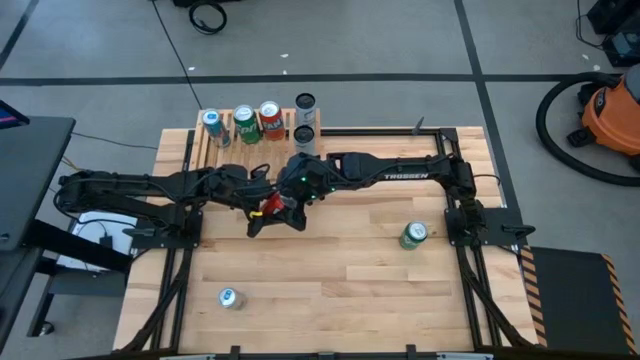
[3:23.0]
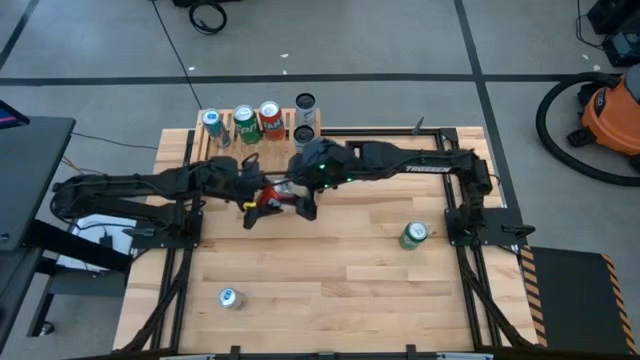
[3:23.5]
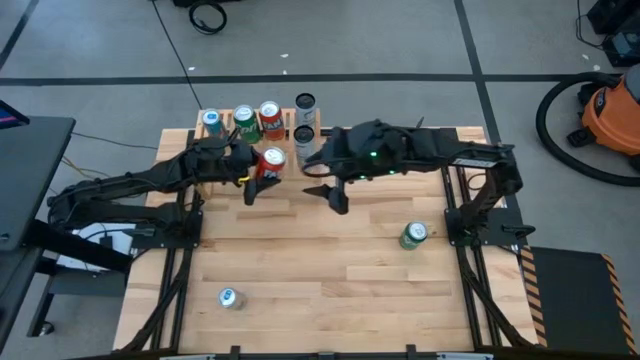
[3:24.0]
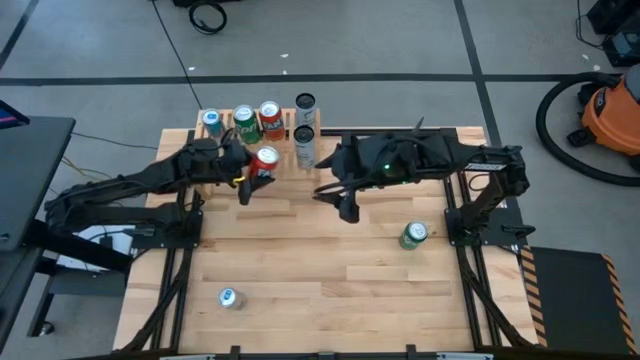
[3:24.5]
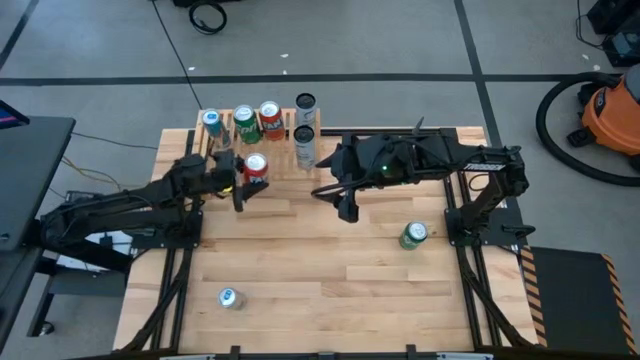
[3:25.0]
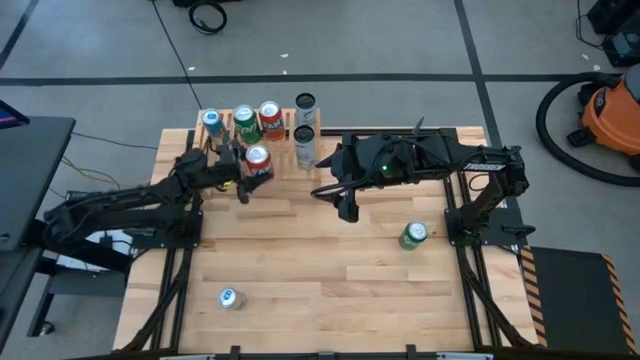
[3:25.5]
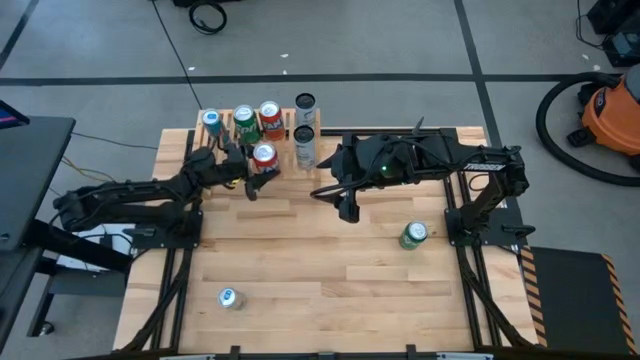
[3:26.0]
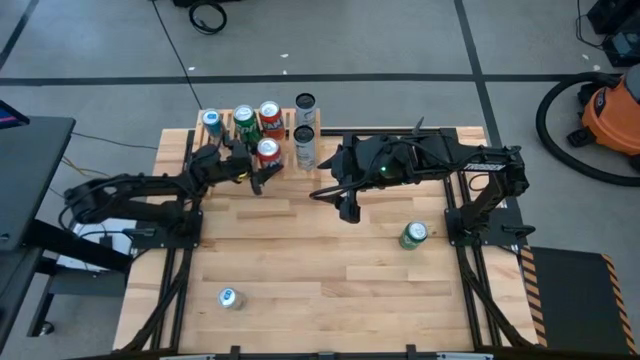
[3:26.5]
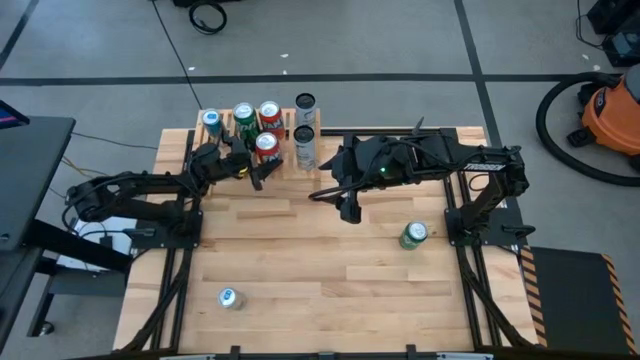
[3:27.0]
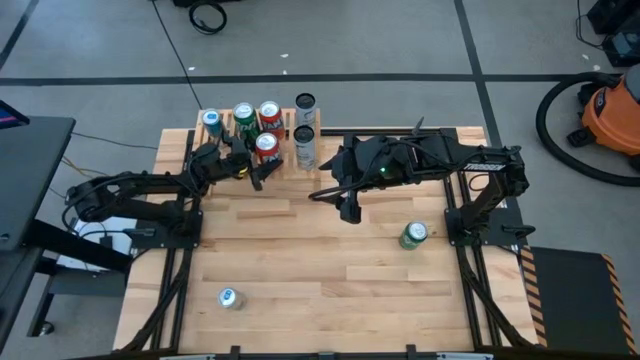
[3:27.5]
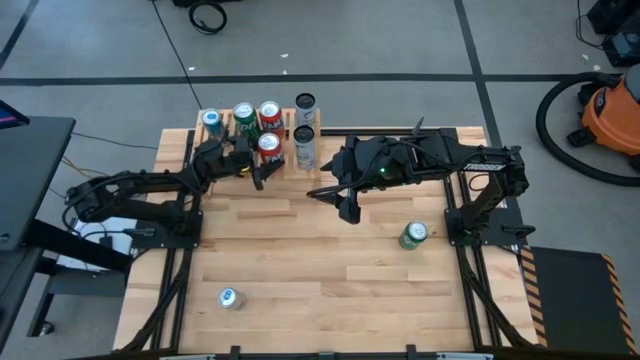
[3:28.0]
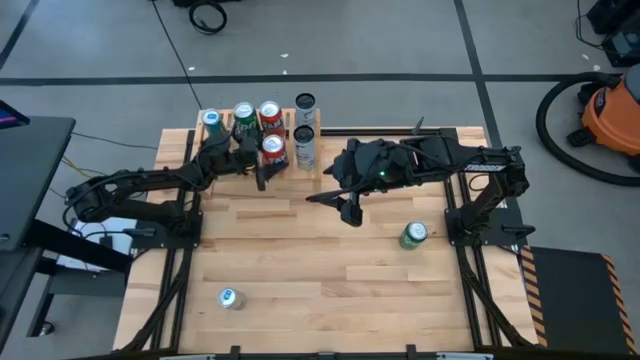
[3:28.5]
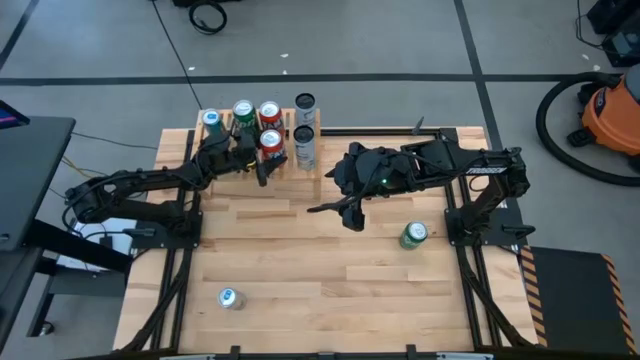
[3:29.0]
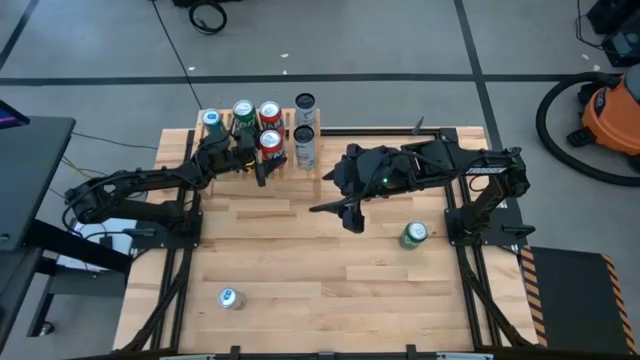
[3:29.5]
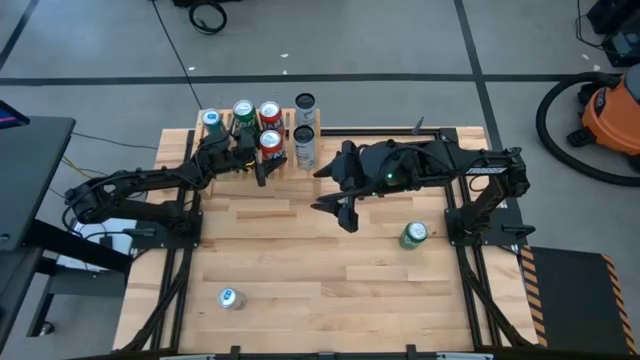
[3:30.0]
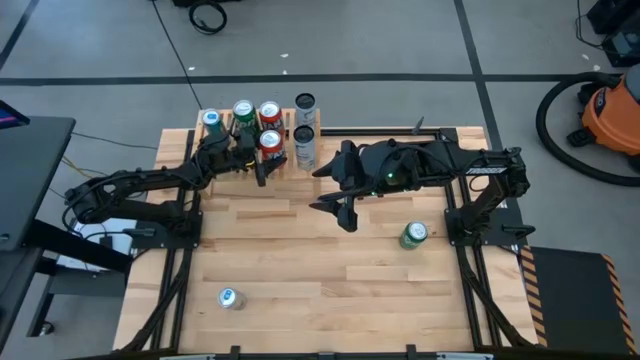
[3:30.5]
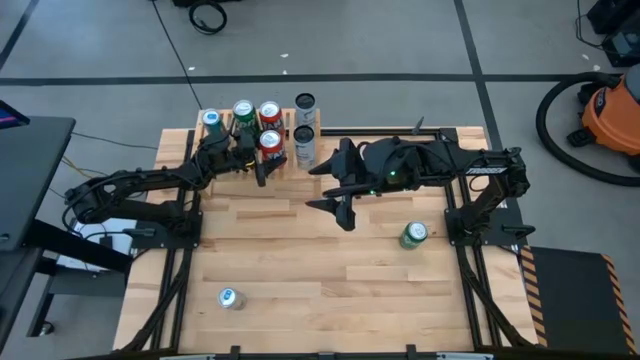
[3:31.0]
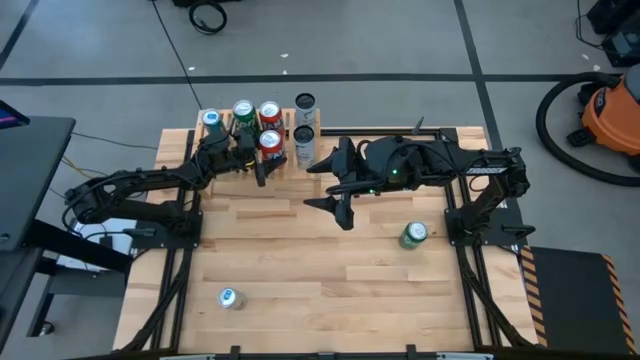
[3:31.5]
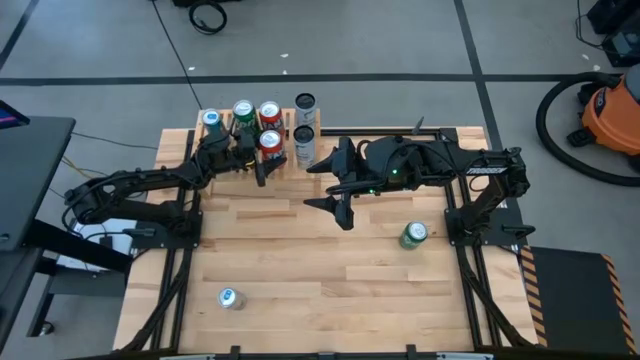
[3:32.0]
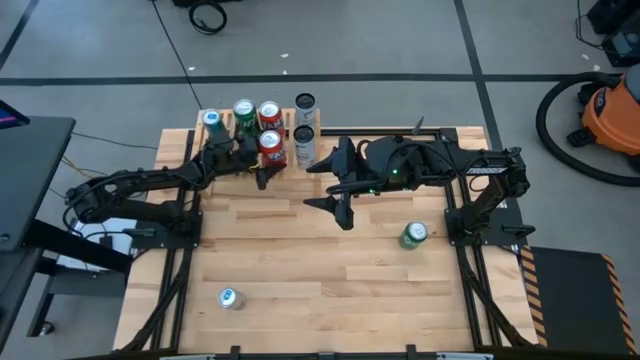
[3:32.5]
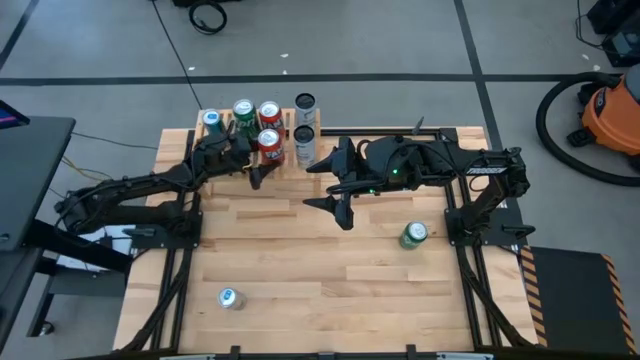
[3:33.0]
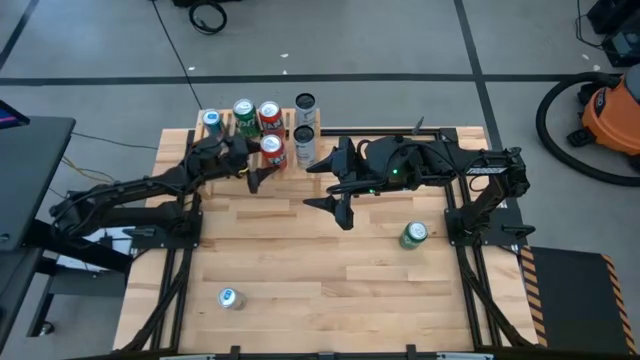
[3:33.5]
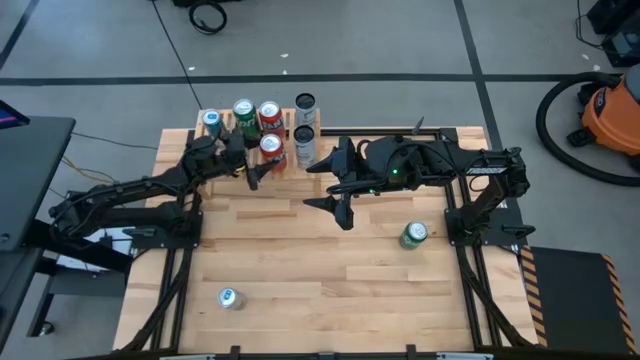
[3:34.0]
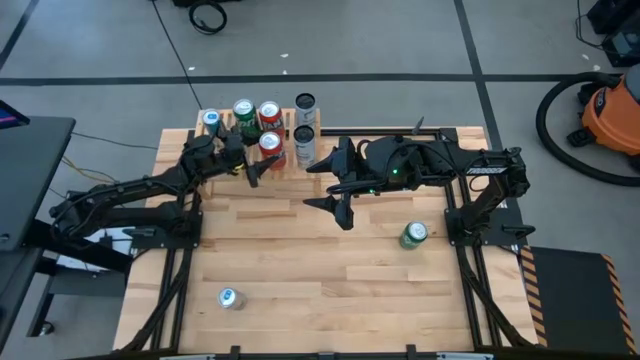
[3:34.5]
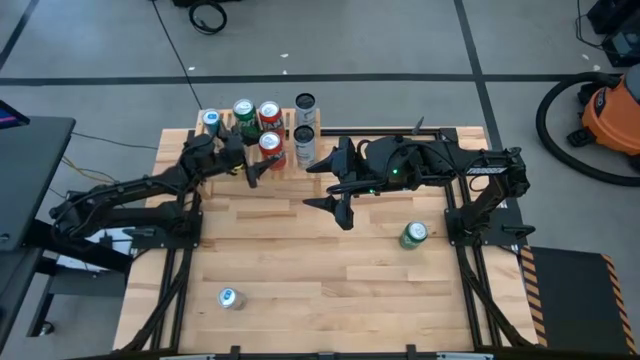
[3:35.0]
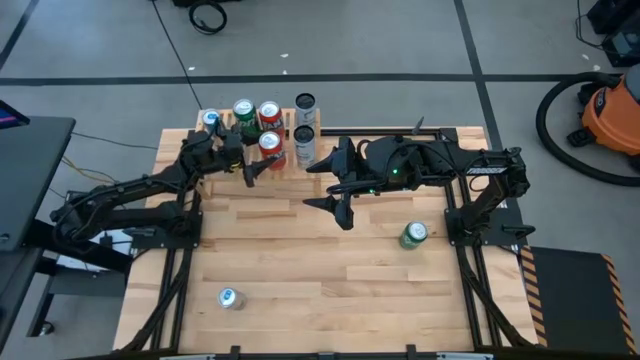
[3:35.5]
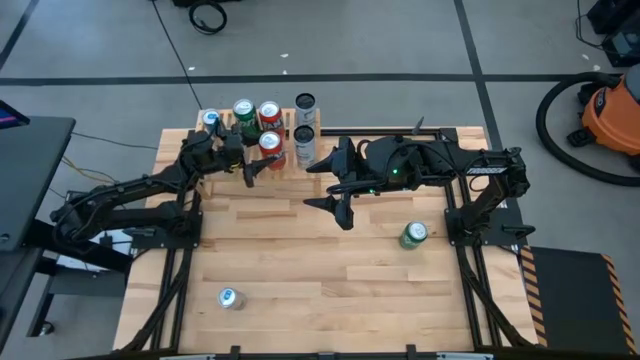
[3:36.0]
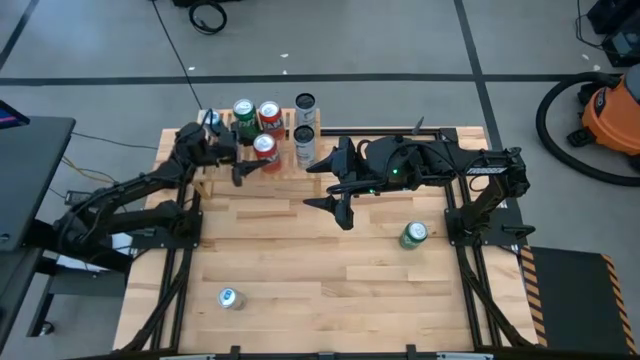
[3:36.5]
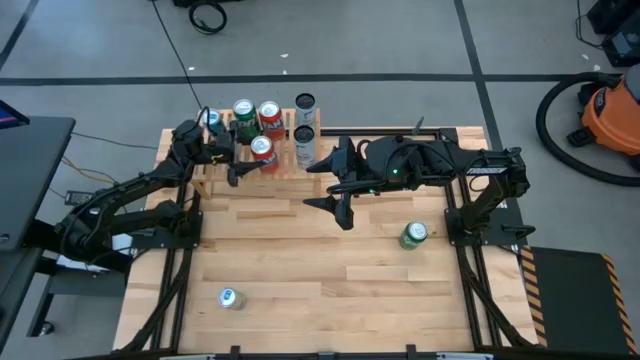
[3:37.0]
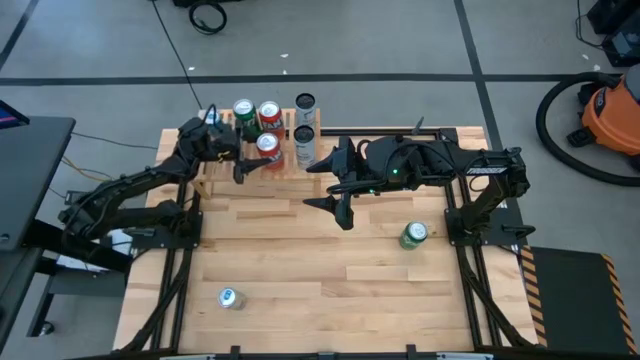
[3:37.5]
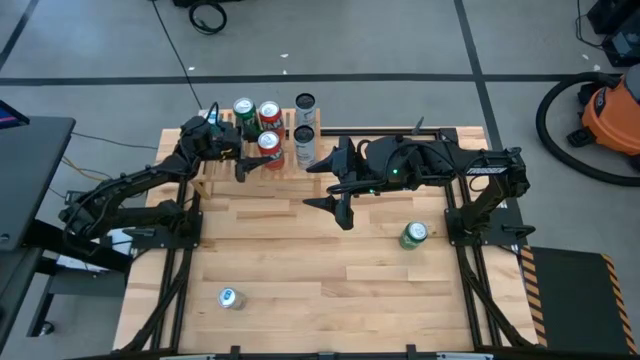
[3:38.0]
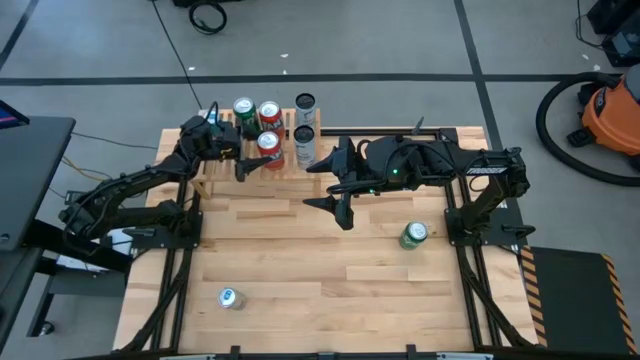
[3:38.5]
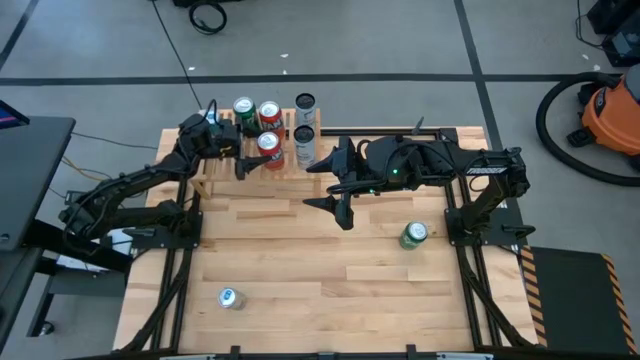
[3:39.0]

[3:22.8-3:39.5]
Task: Place canned beverage on shelf
Put the orange soda can on the shelf

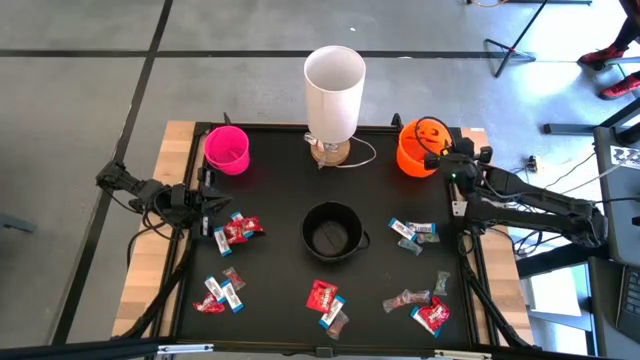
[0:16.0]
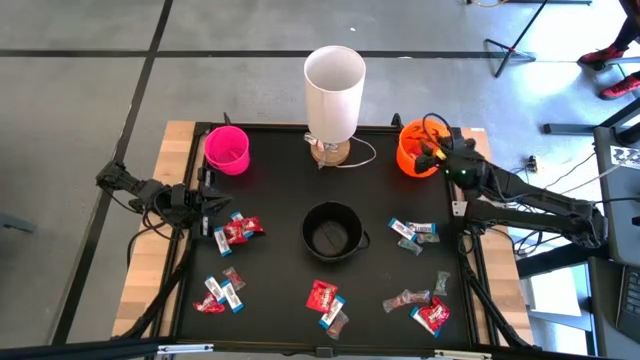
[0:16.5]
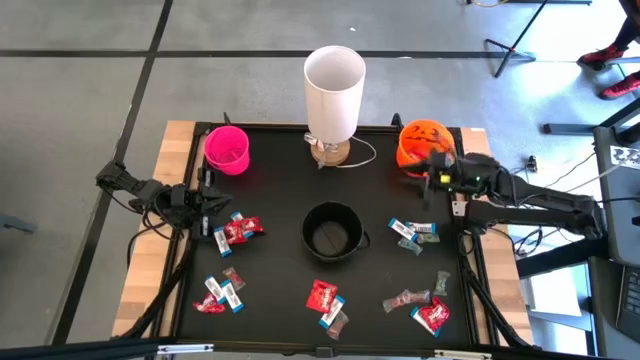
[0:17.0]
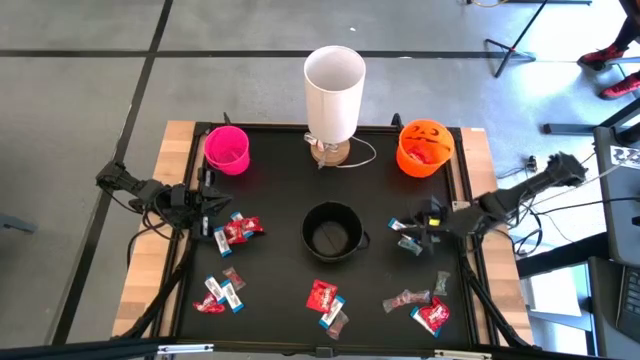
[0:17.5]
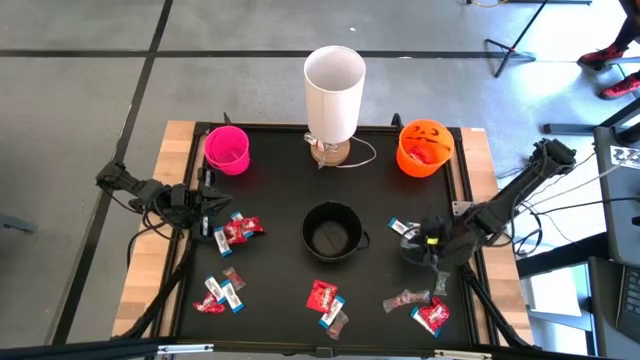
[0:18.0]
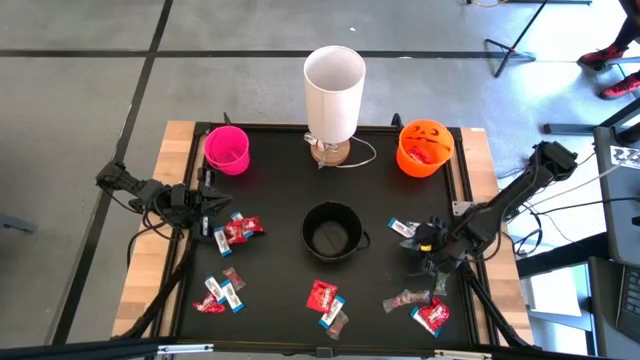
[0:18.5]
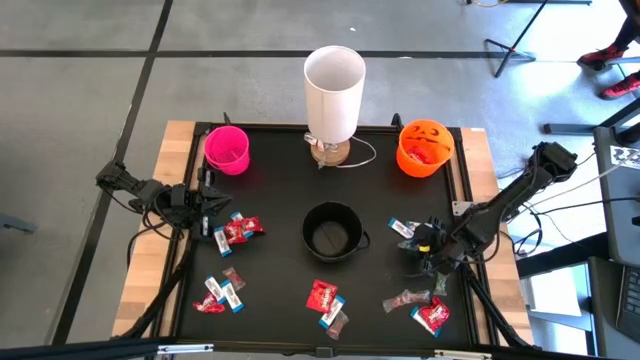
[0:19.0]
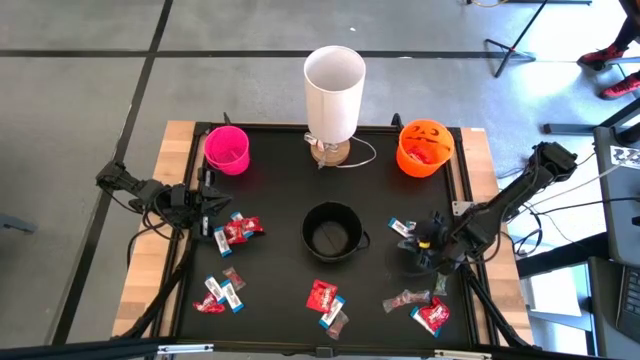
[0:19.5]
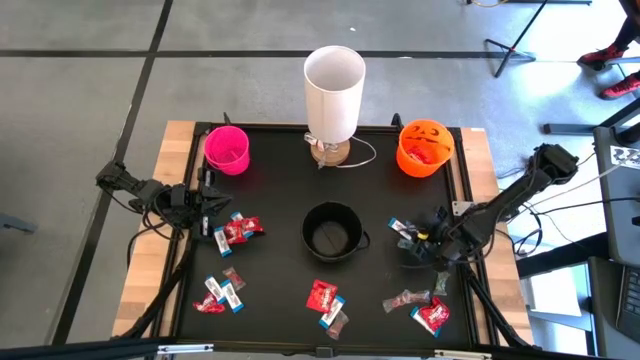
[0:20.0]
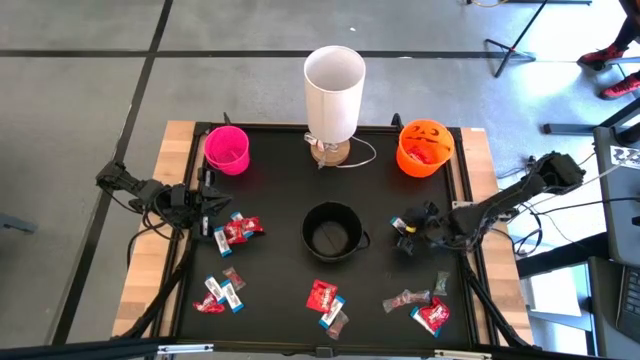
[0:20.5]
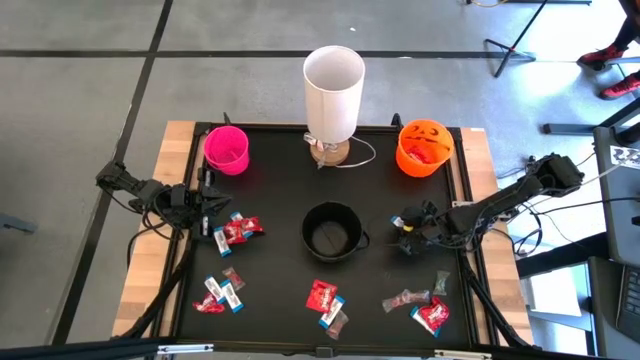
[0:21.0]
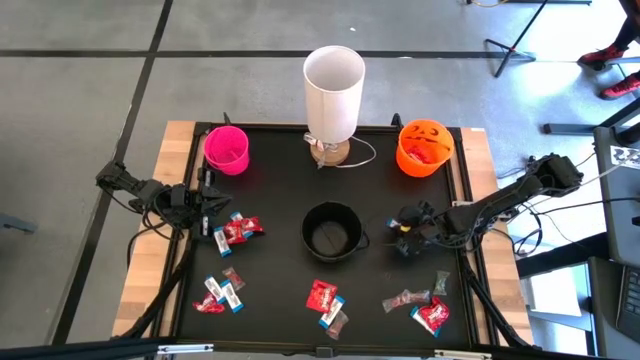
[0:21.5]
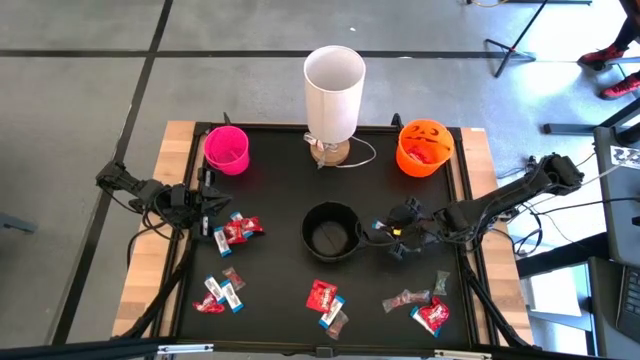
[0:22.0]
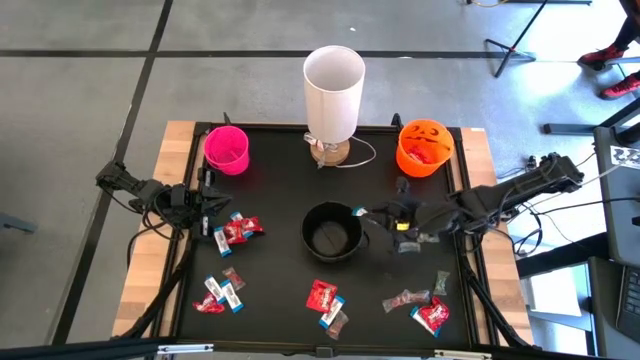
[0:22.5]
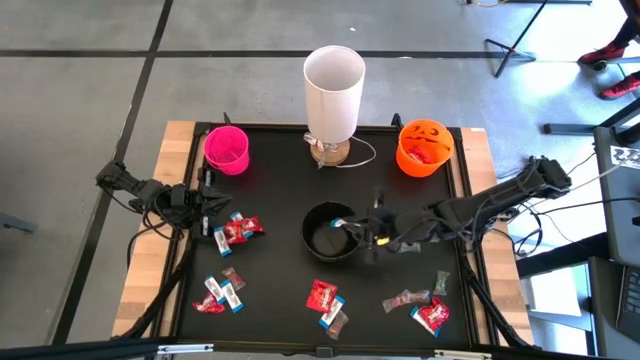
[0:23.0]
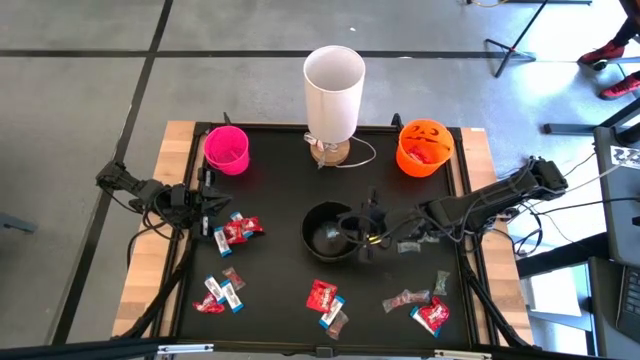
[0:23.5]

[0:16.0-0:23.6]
Task: Sort candy
Put the white chocolate into the black bucket
